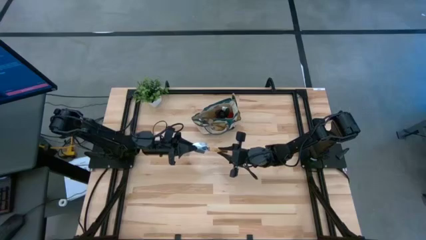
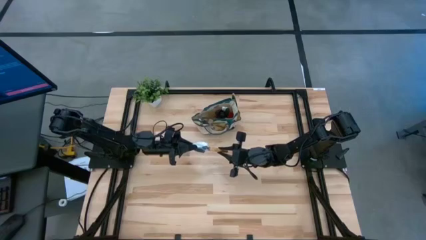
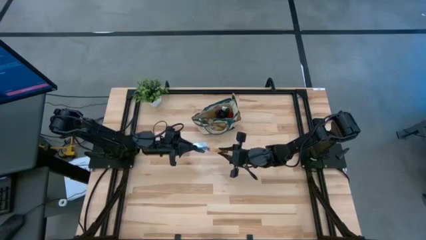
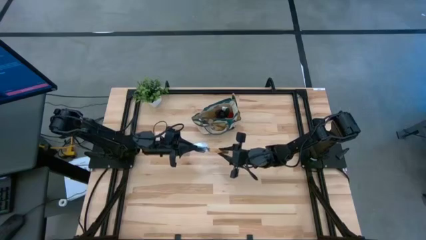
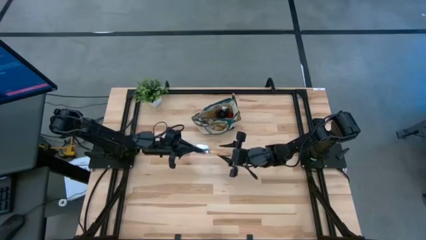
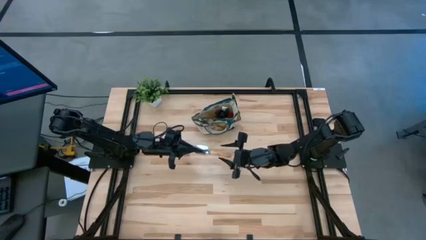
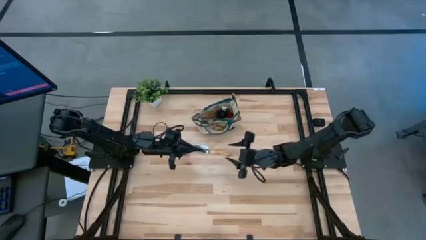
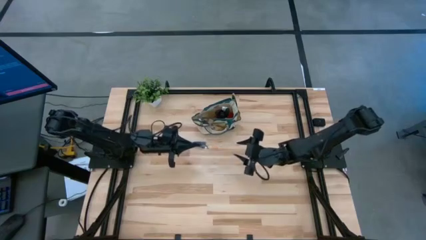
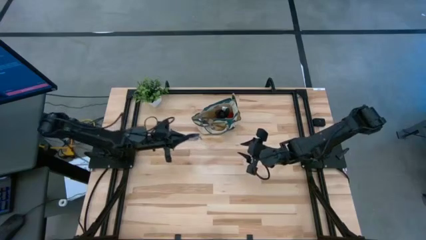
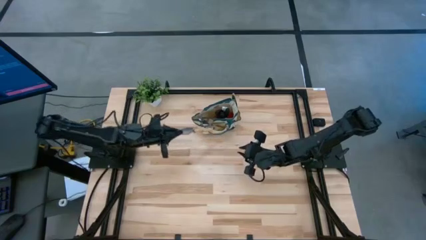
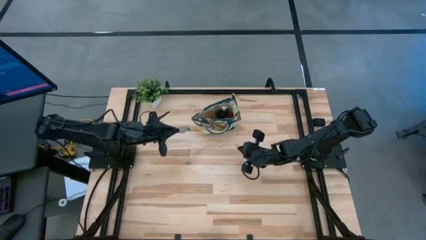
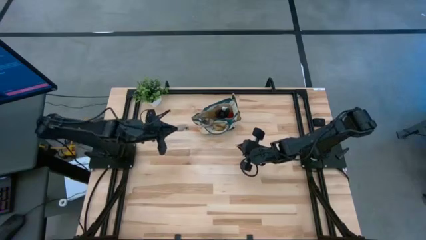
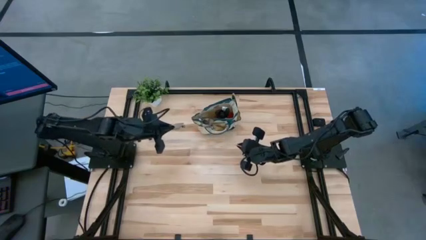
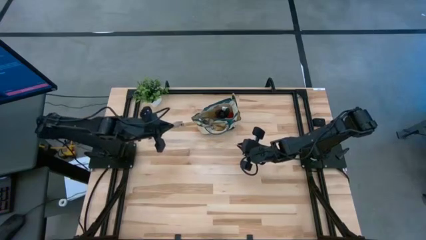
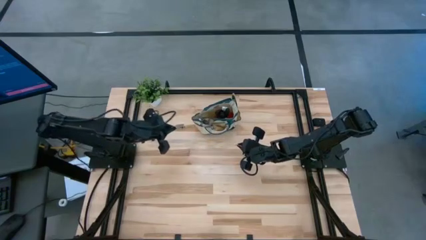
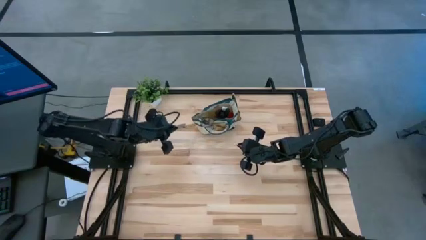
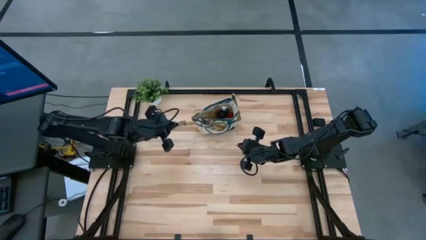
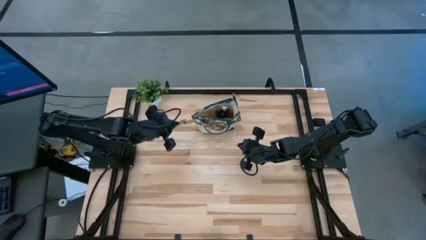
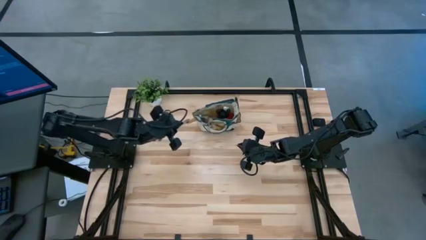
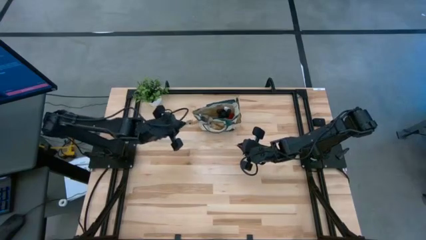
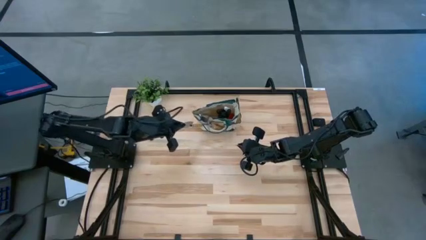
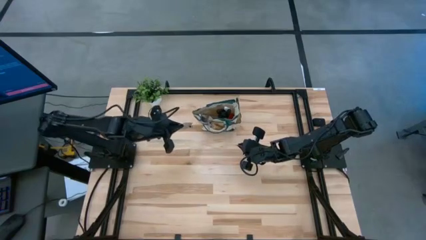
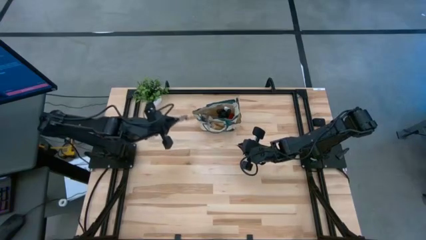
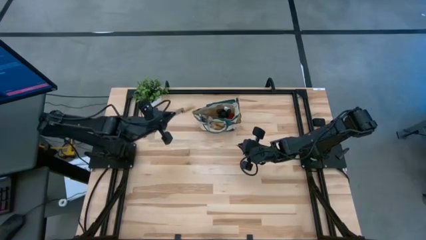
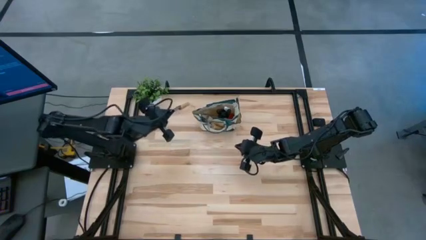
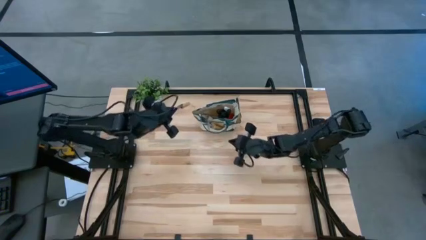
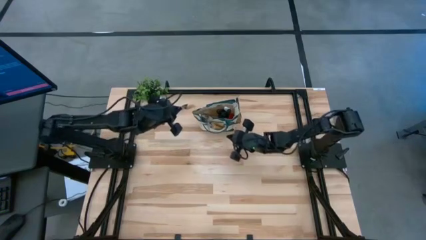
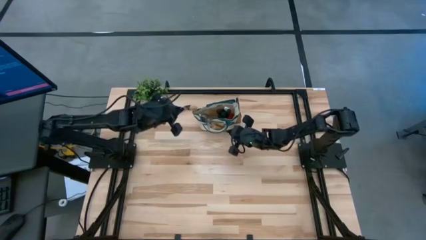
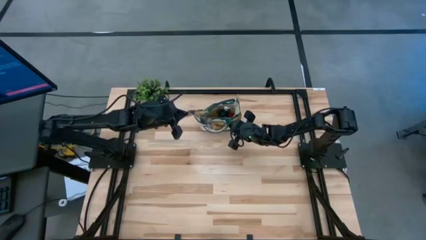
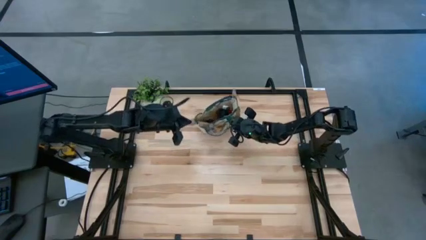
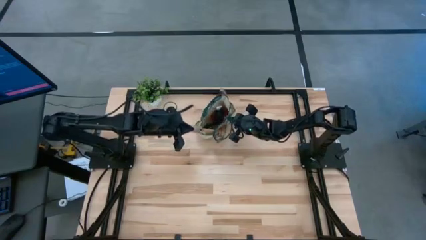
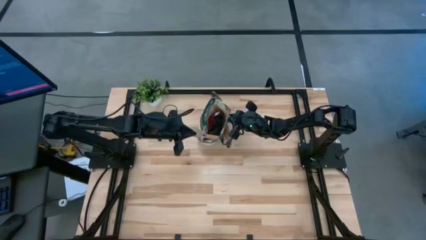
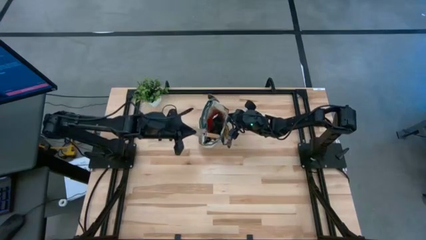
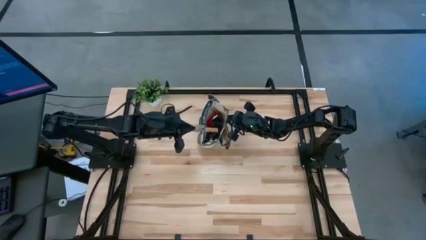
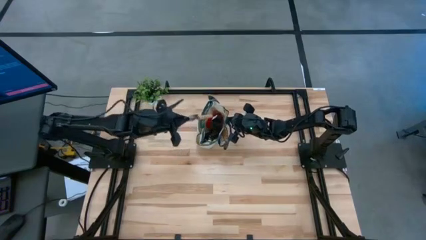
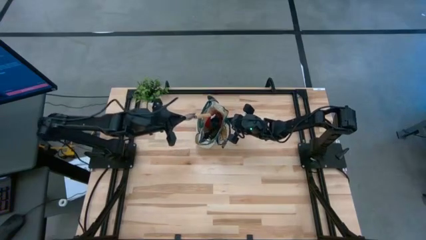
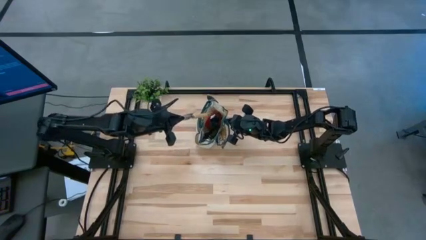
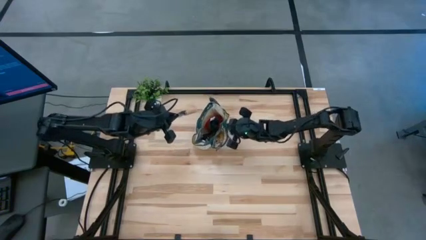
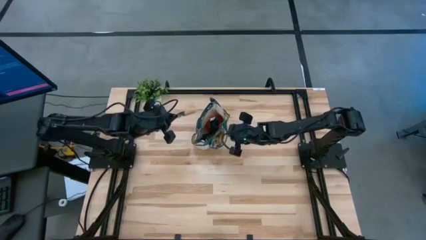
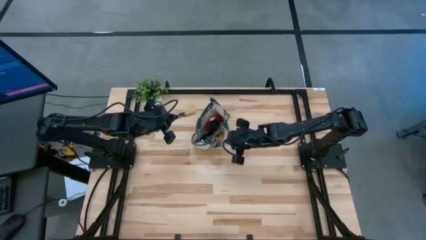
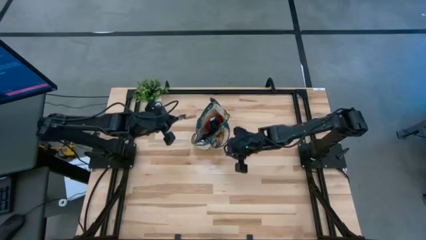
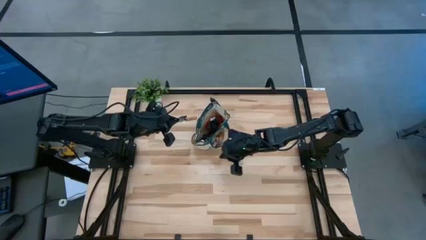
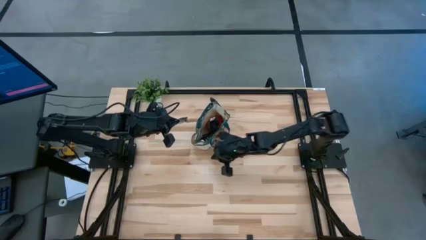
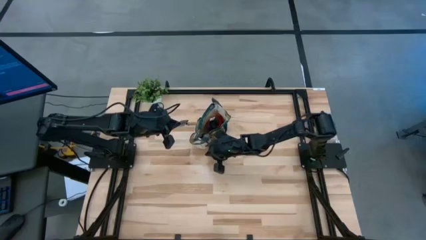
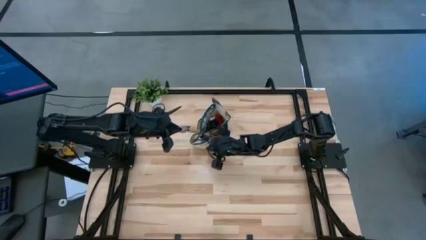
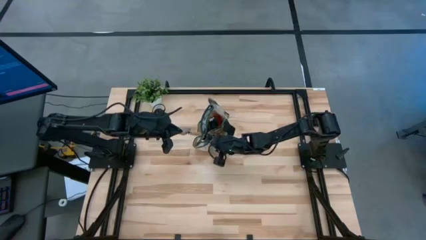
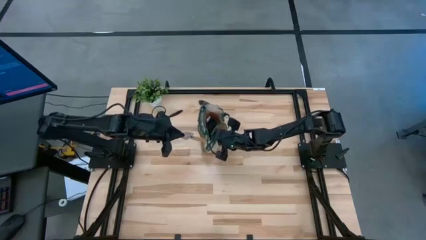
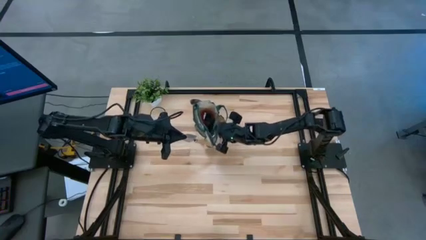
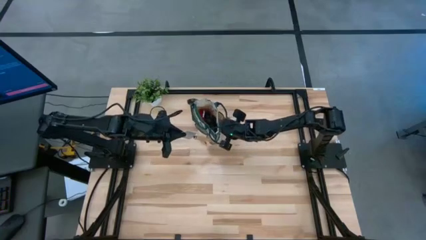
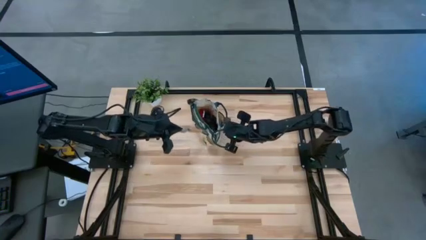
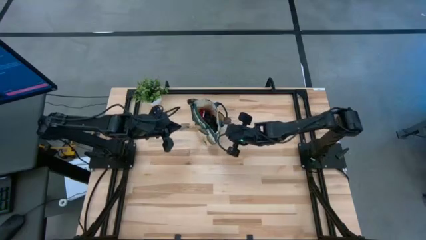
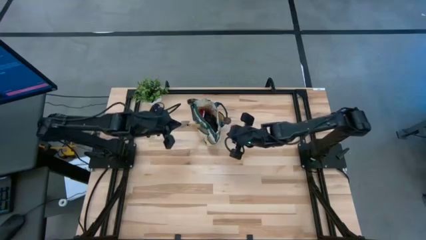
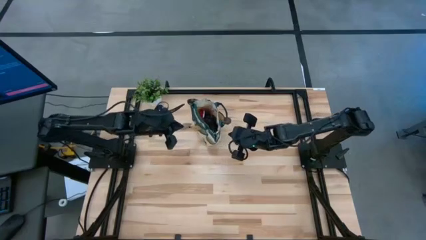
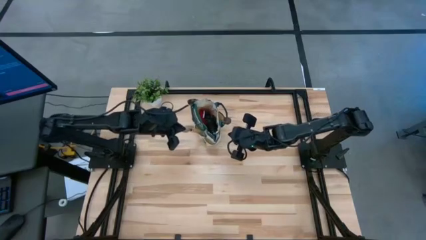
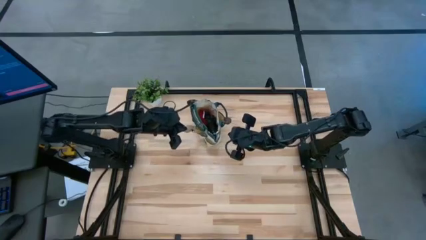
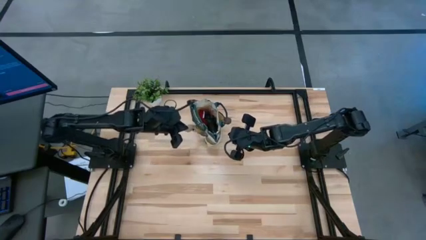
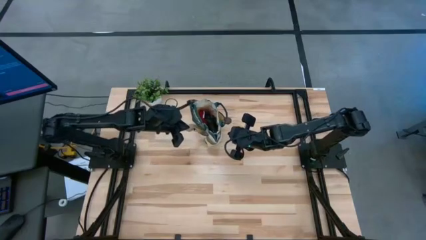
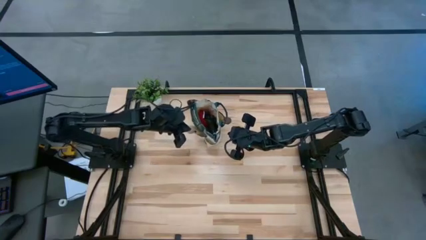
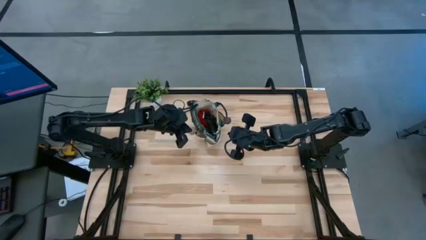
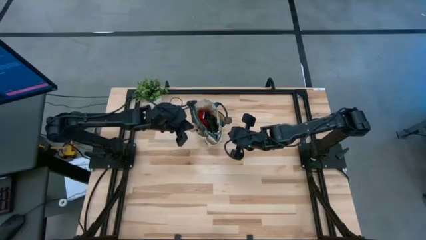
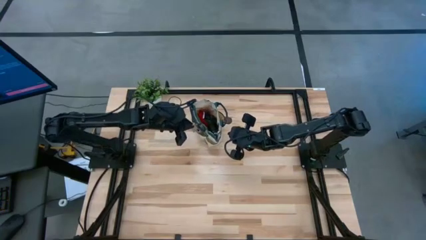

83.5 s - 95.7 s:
Task: Pick & Place Garden tools in Gardening bag
Put the trowel into the gardening bag

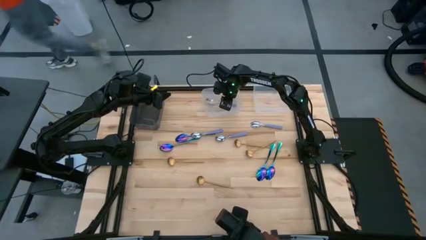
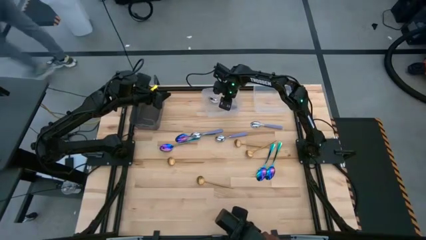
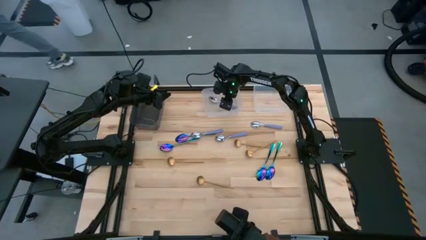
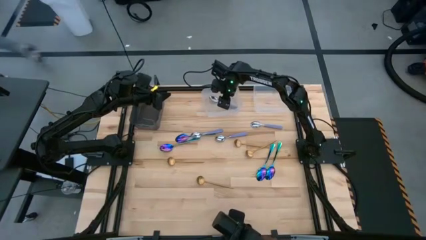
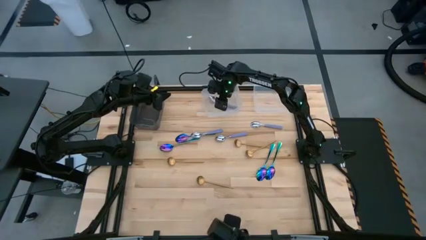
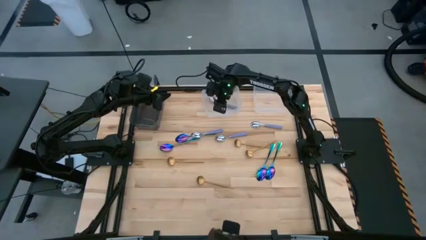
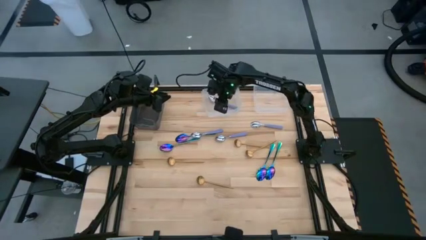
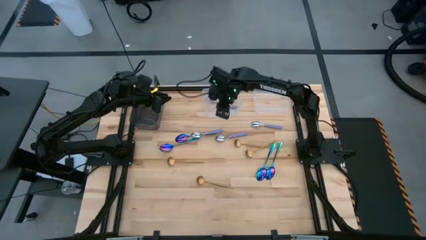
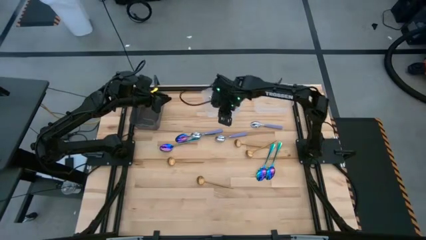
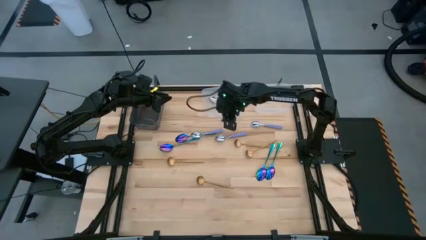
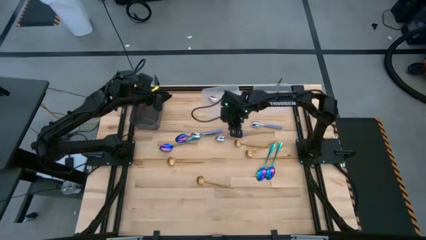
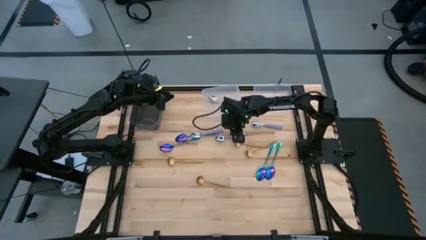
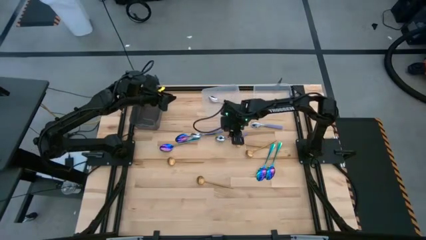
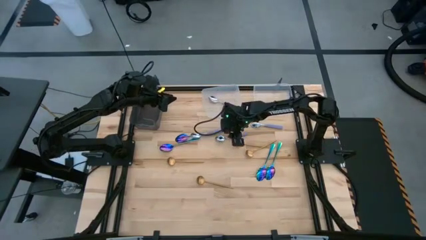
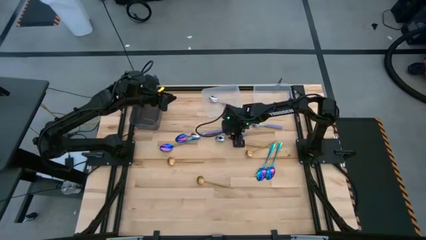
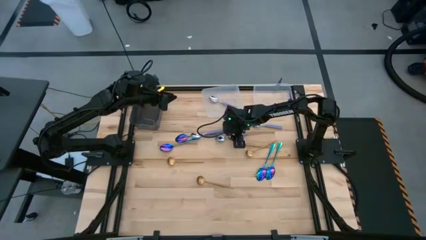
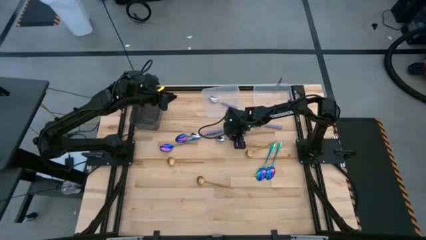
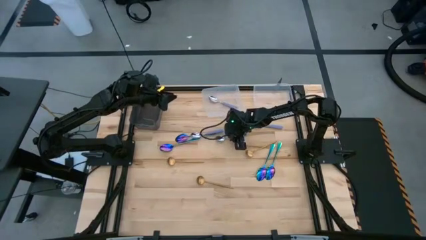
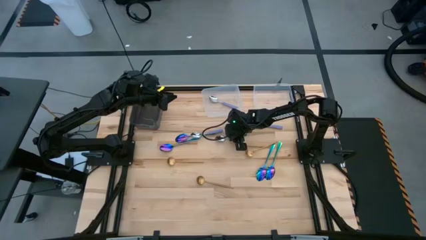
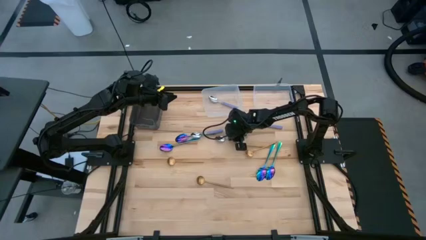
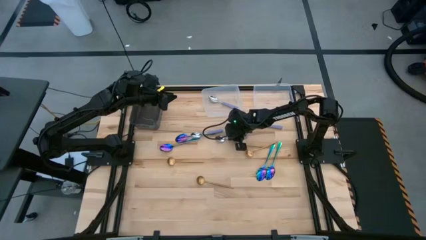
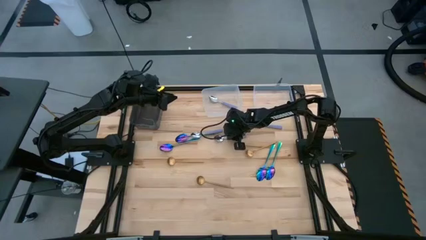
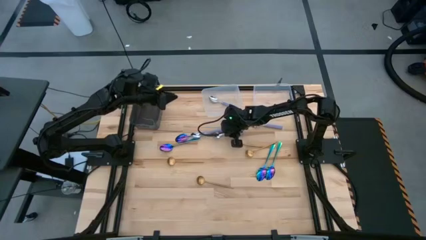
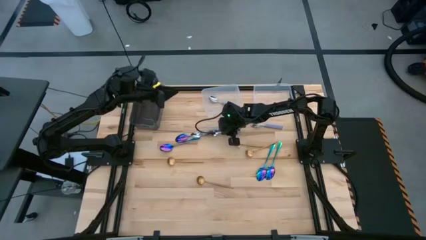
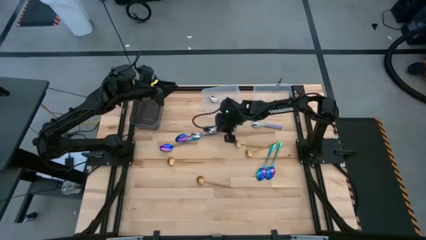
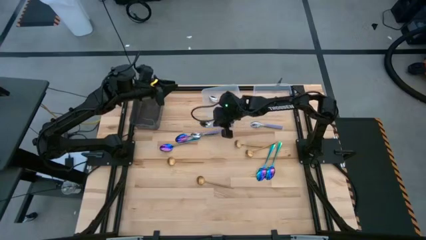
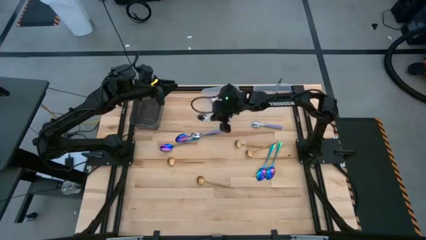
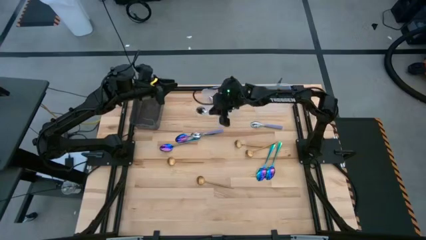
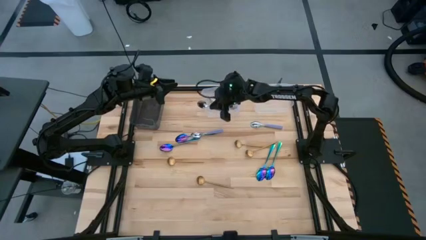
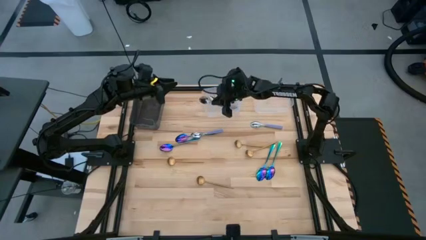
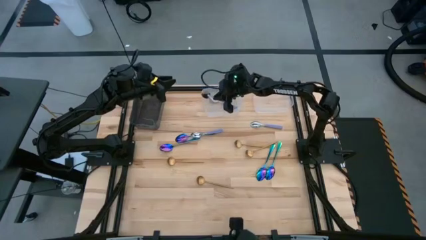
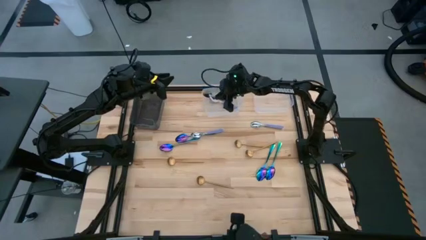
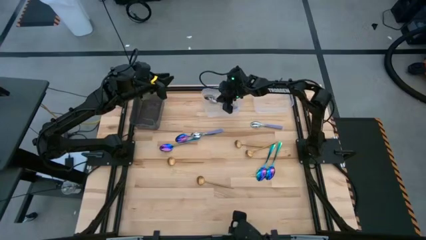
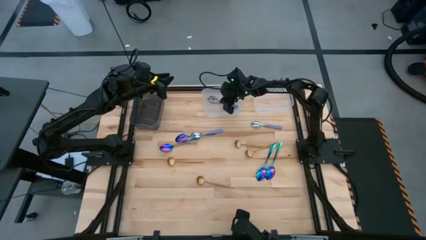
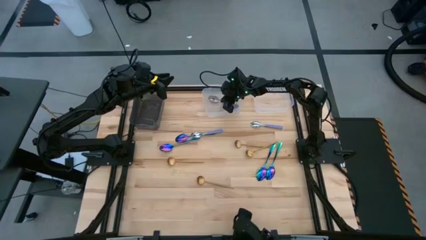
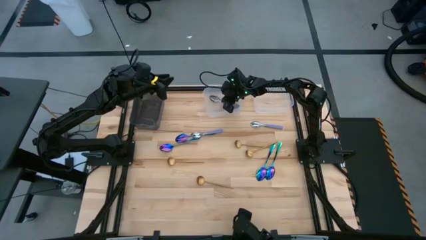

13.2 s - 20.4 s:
Task: Sort silverware by color (type)
Put the purple spoon into the left transparent bin
